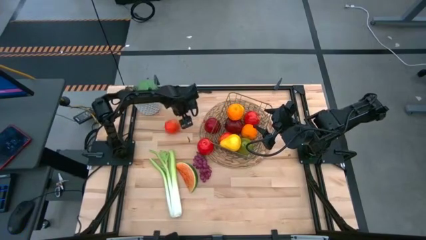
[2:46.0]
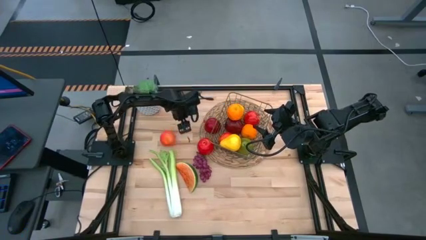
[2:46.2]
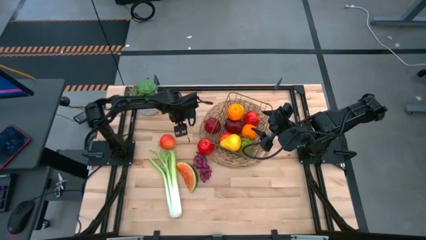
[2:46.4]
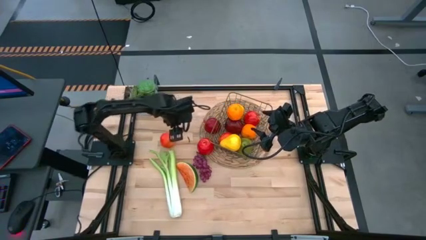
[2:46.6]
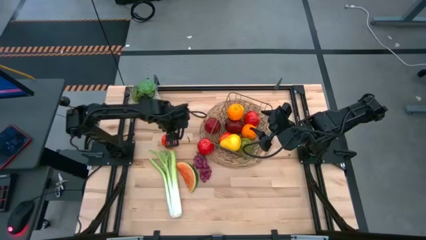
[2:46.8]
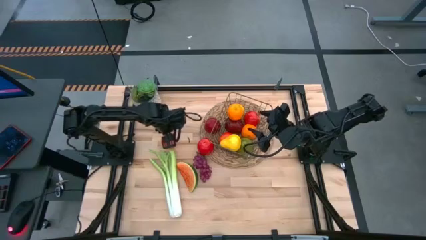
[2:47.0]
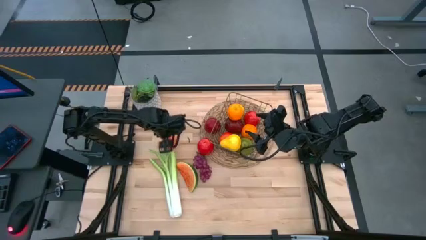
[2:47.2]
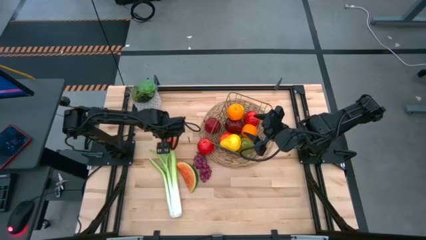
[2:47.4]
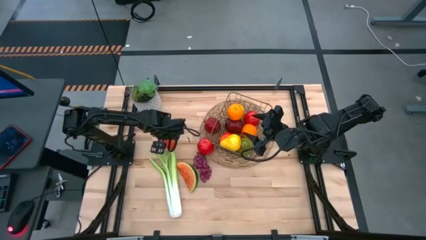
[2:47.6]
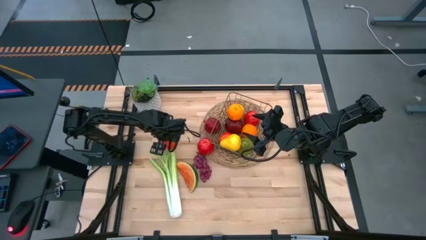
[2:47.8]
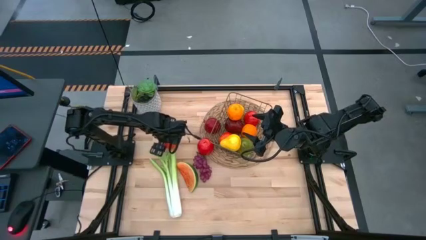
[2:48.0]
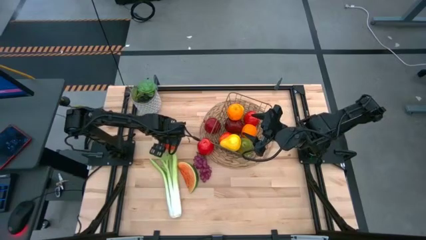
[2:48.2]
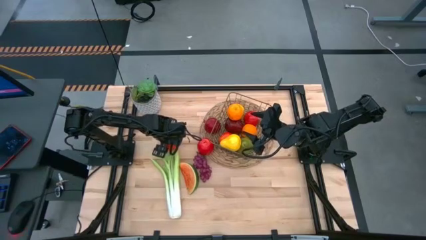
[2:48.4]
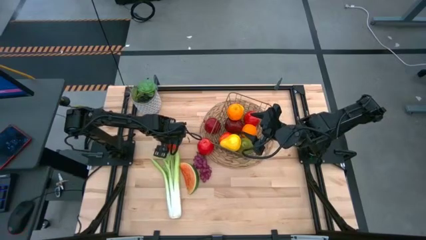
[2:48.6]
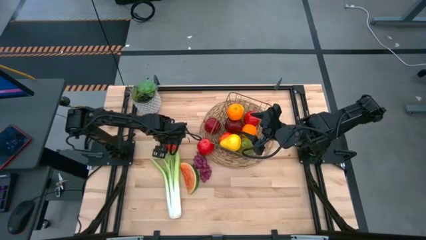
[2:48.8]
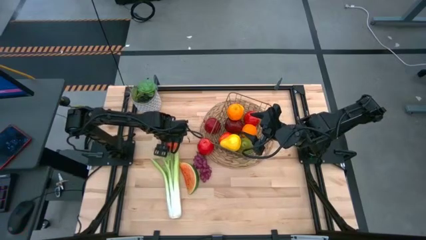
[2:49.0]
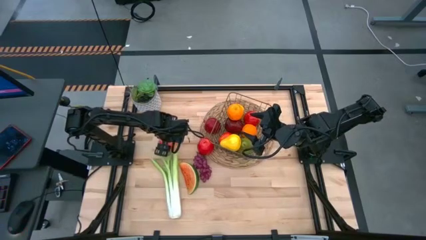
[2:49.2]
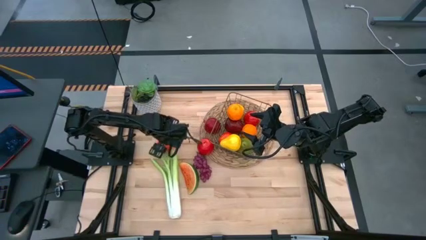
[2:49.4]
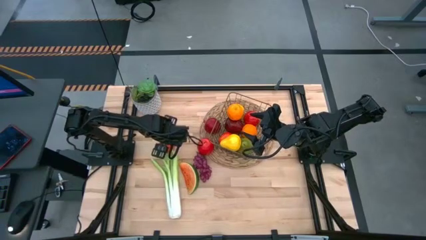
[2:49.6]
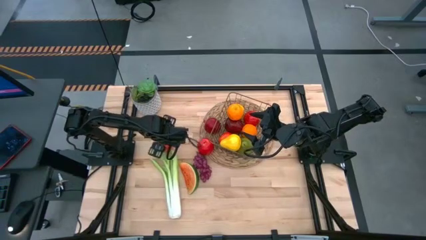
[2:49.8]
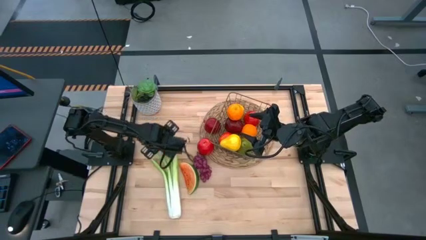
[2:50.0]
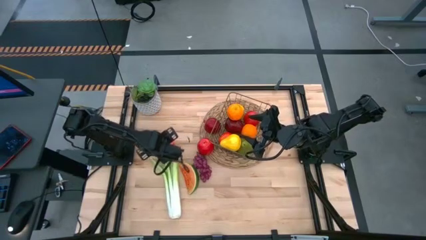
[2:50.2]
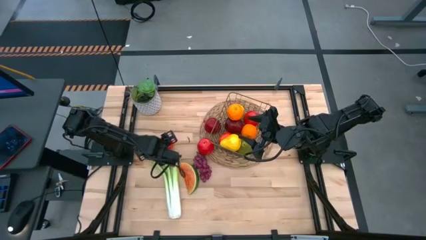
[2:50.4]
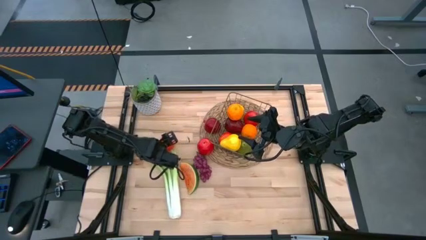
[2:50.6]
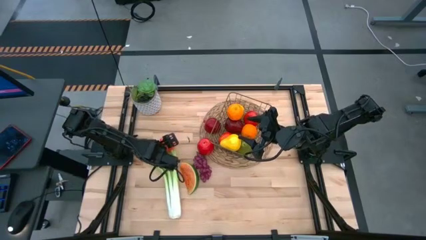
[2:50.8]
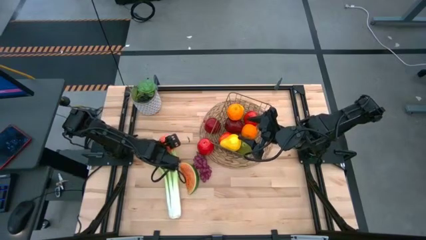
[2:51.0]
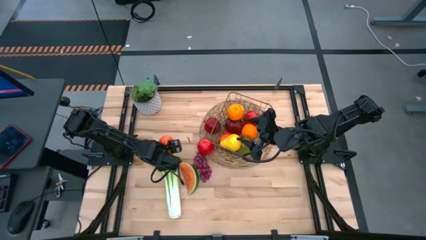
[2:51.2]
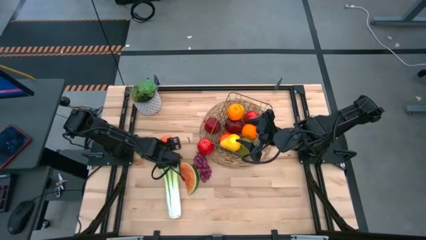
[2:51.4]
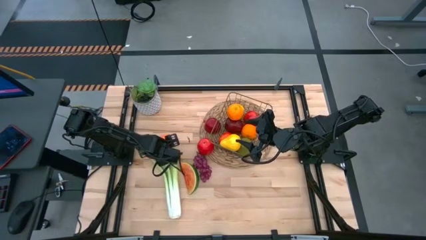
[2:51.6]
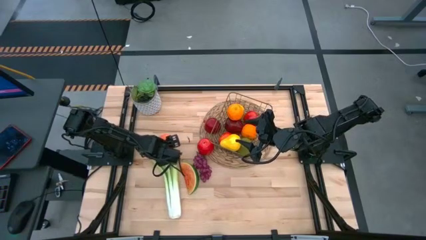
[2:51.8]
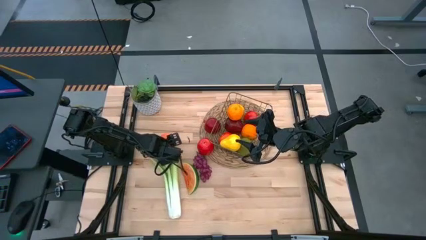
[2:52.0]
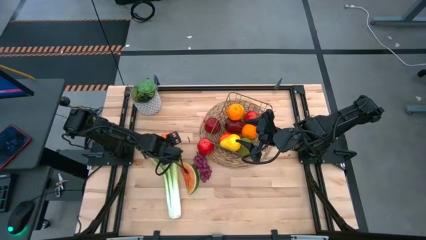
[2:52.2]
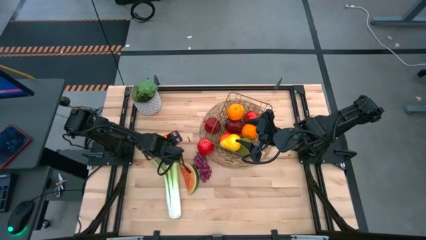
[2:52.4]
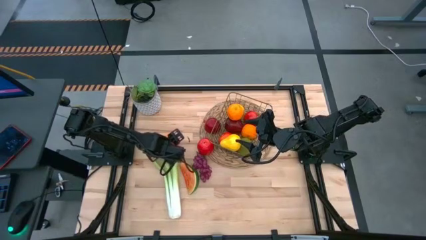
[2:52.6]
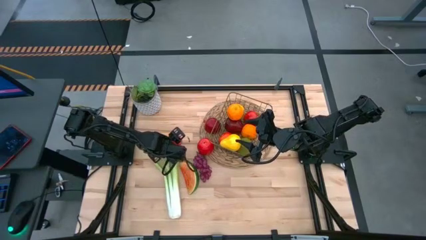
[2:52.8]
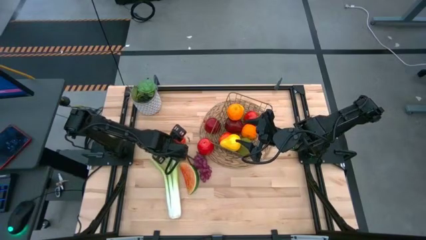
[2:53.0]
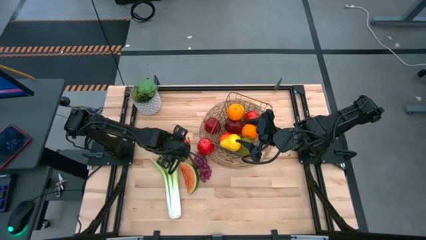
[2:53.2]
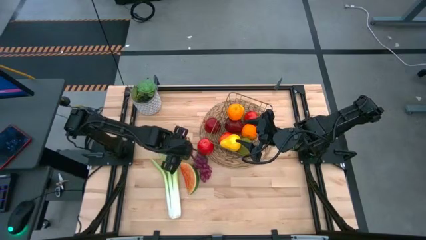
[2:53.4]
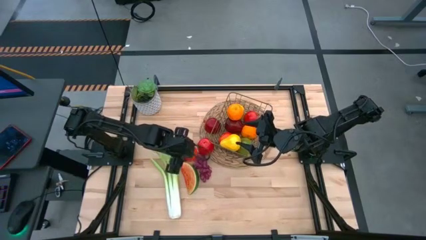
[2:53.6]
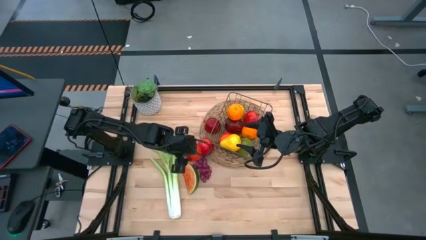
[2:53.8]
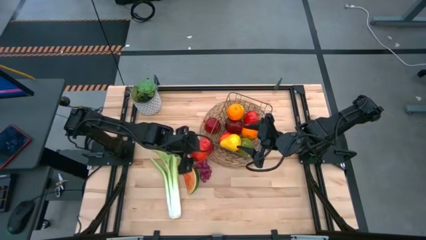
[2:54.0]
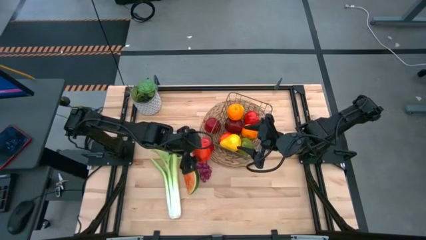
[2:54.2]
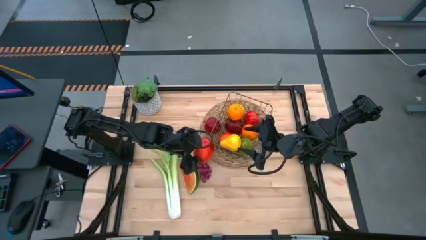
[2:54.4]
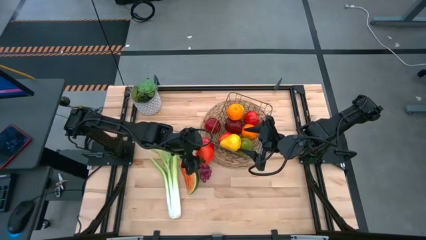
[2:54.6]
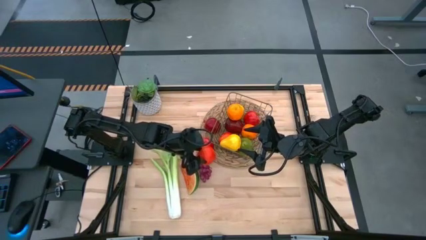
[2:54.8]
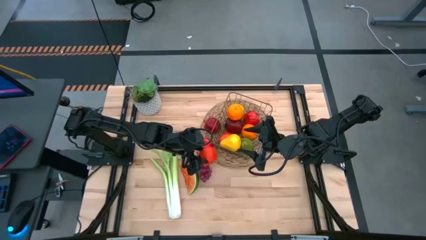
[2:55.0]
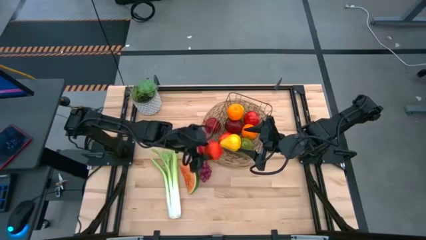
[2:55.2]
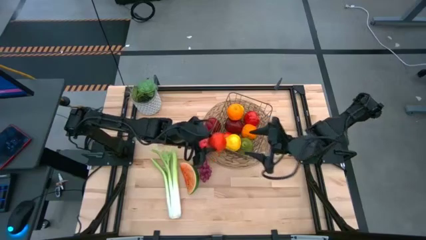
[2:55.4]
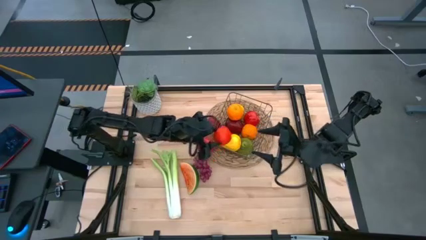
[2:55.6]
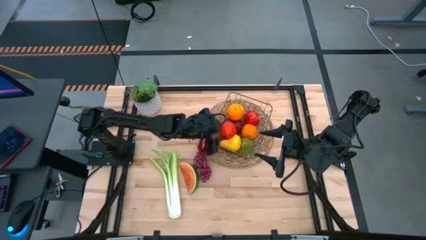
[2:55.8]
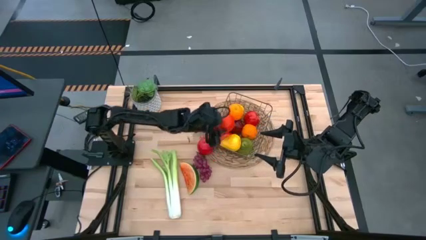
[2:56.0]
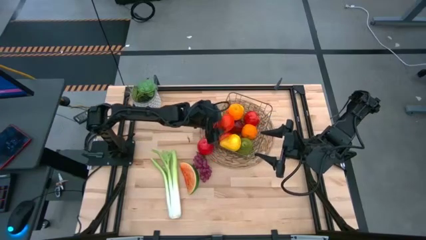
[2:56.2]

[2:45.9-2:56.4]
Task: Build produce basket
Put the red apple into the gold wire basket

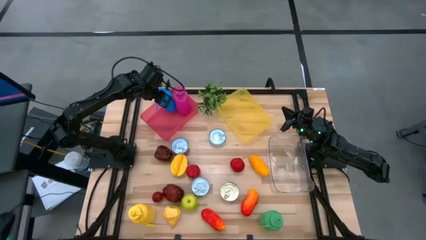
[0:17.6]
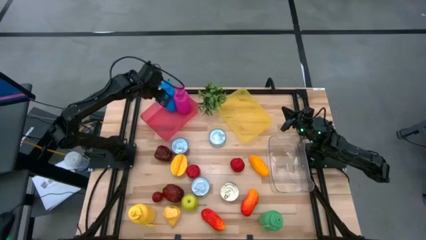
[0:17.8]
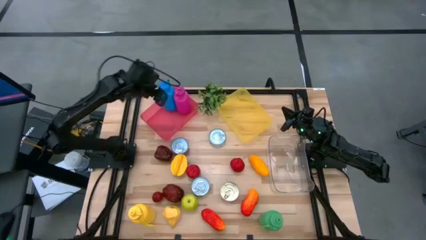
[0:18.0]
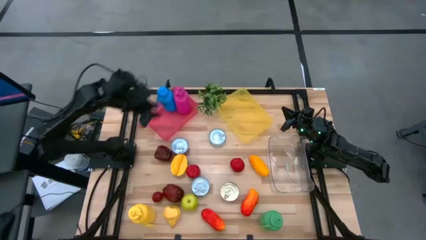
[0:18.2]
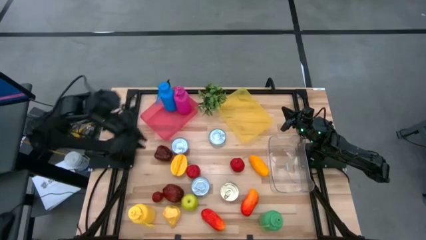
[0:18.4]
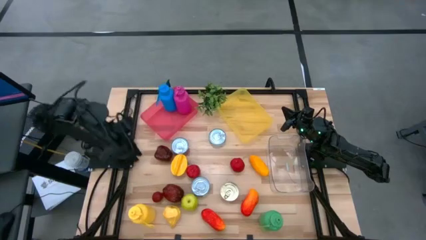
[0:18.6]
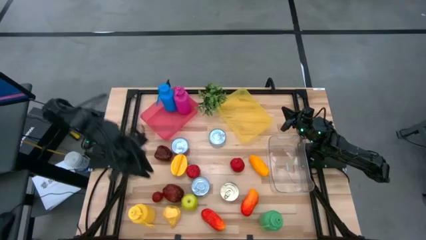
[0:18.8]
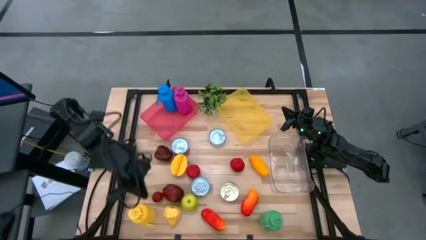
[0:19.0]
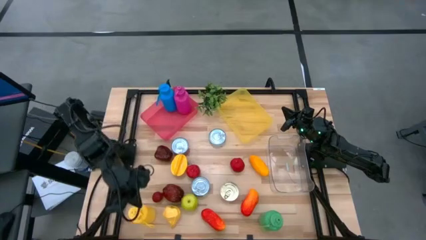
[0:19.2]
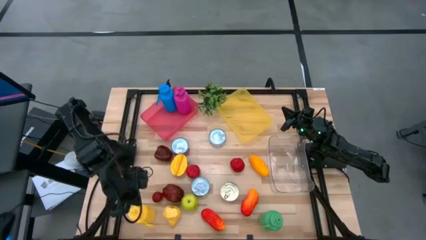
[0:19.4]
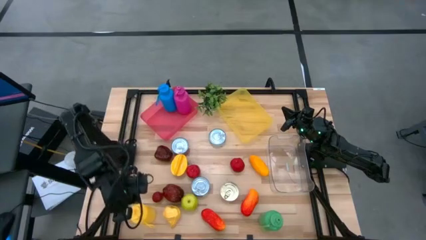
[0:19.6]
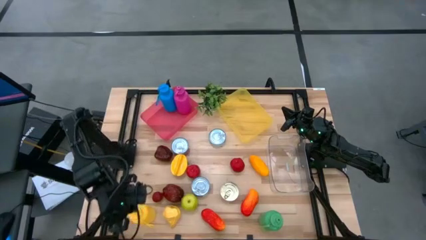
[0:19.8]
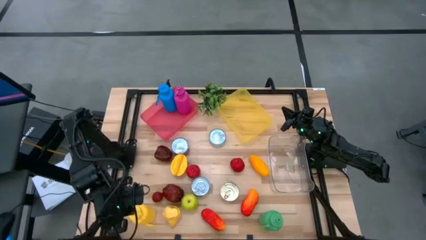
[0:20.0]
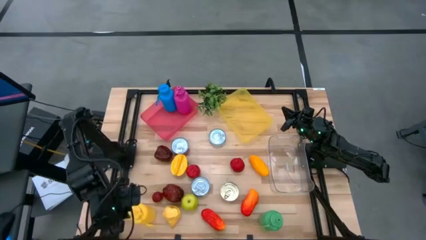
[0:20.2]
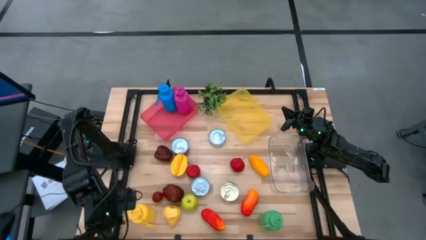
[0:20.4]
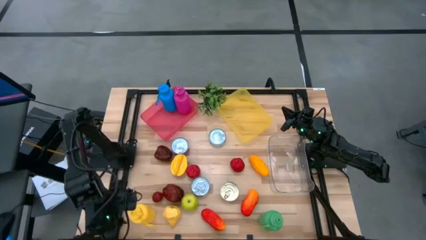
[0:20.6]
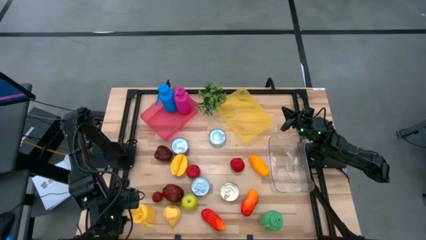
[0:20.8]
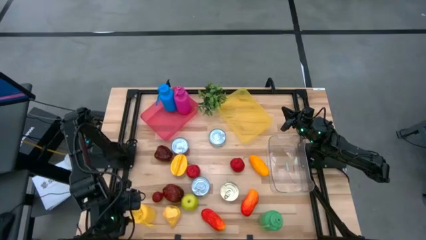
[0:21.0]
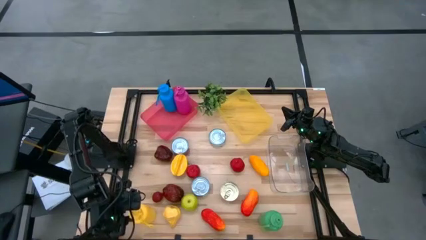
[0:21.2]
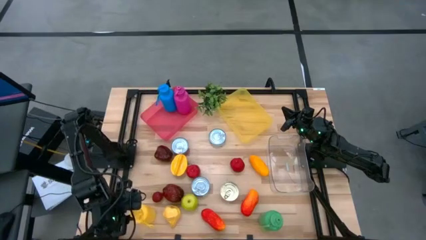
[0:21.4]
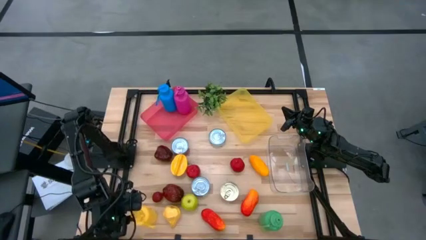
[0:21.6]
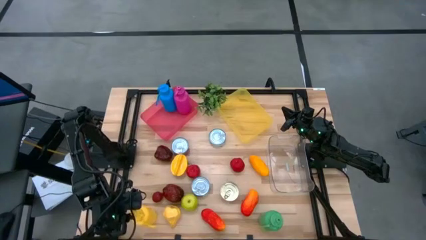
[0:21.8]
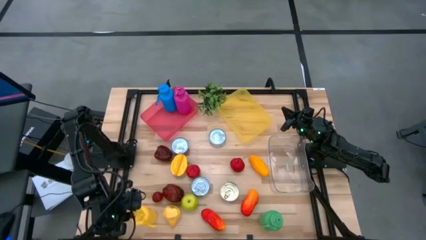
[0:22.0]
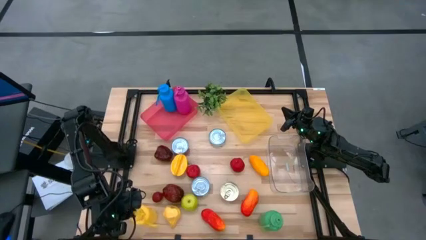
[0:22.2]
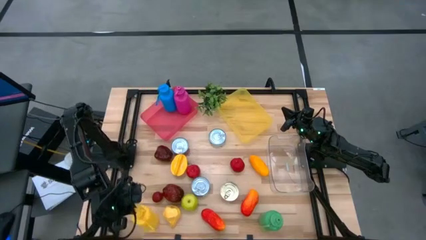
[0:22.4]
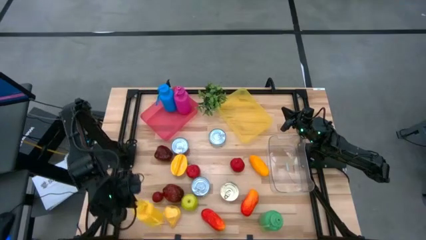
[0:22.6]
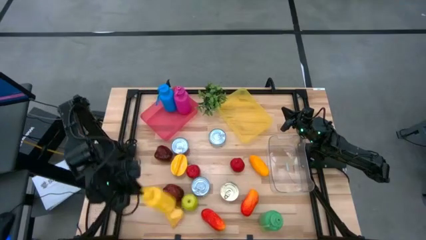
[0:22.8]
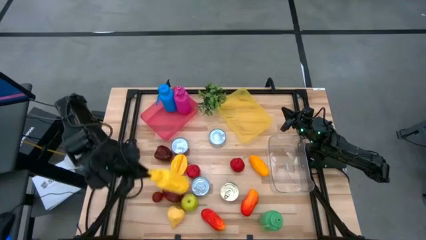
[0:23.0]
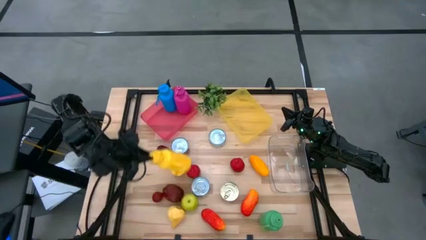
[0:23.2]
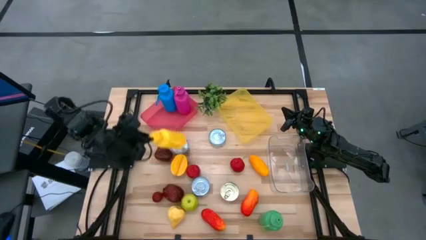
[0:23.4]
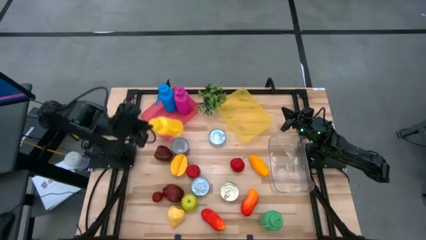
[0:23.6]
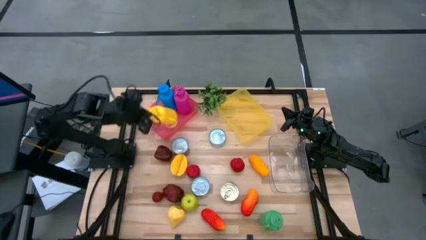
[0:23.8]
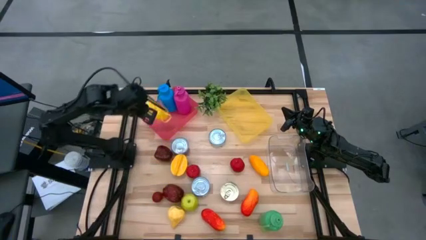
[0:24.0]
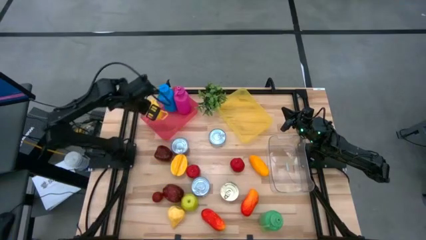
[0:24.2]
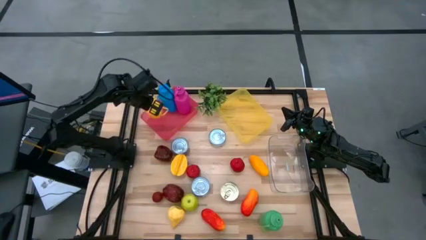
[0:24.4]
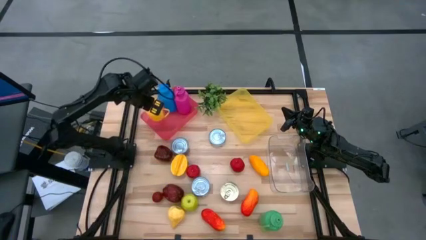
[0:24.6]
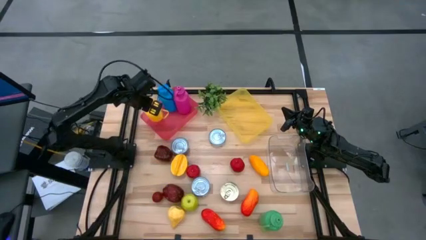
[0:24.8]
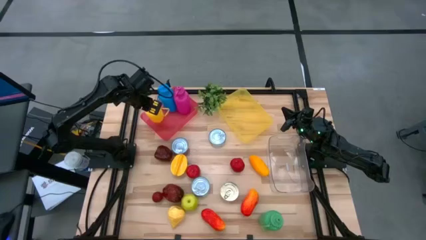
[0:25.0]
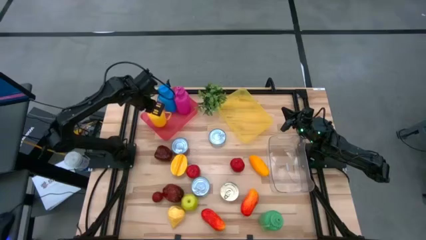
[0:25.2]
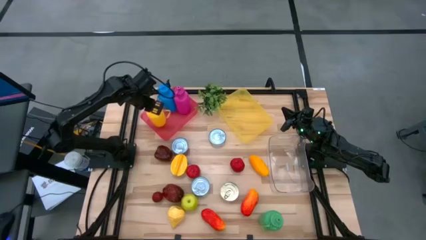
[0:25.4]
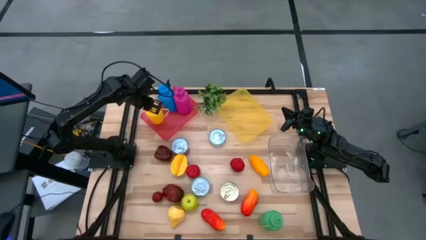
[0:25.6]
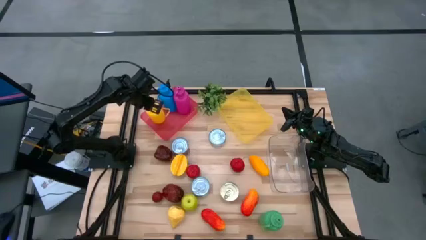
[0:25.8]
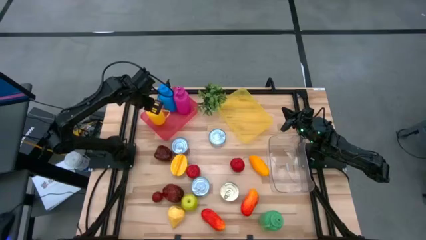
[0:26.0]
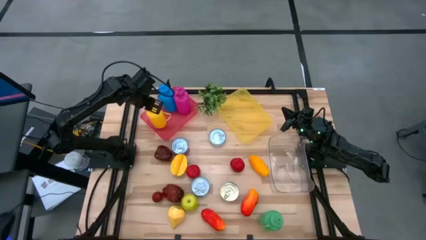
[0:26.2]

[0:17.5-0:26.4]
Task: Pick & Place Food Item
Put the yellow water bottle into the pink bin
